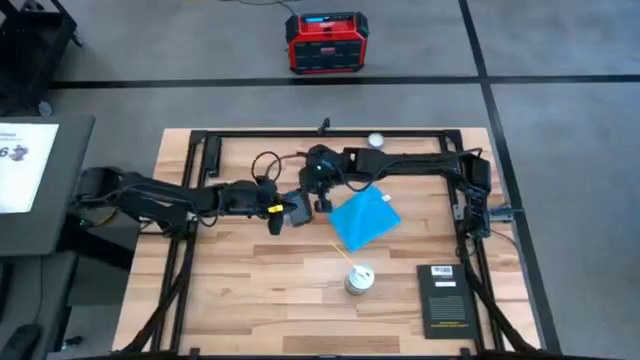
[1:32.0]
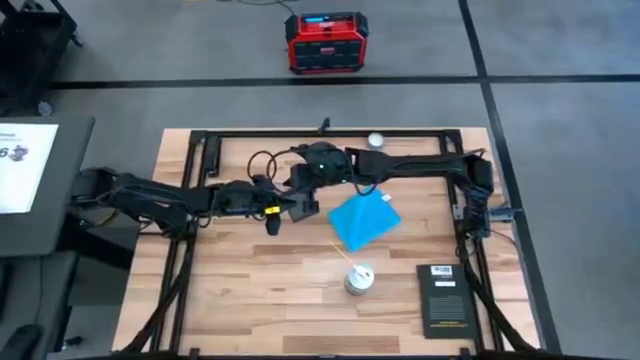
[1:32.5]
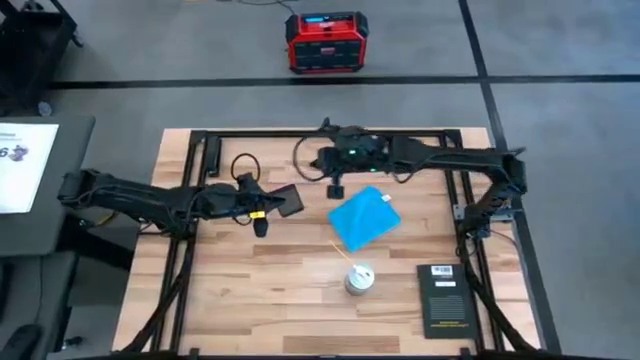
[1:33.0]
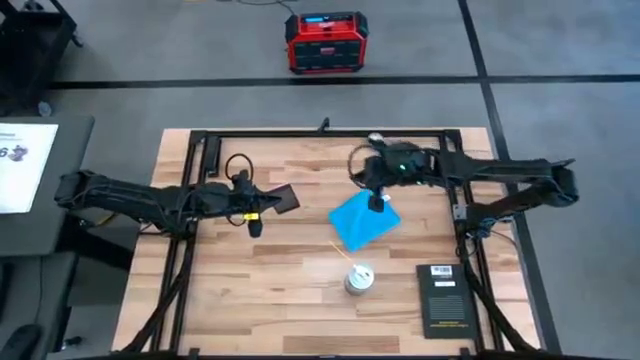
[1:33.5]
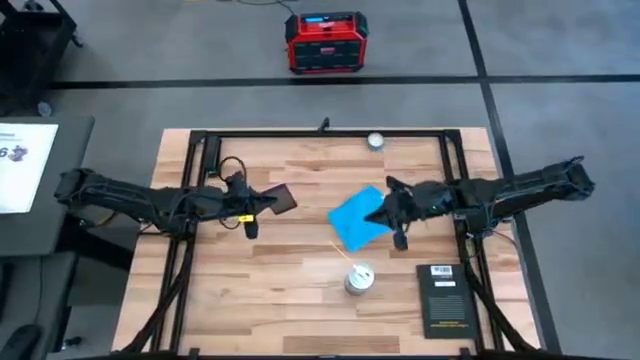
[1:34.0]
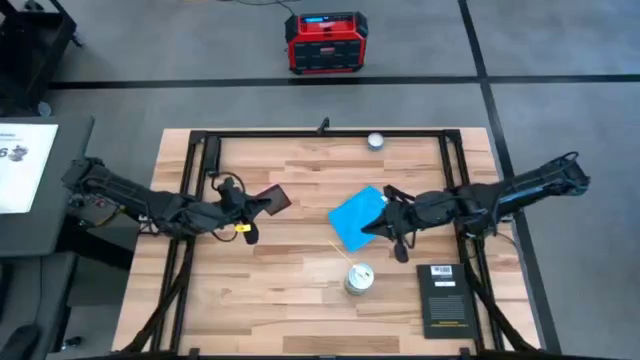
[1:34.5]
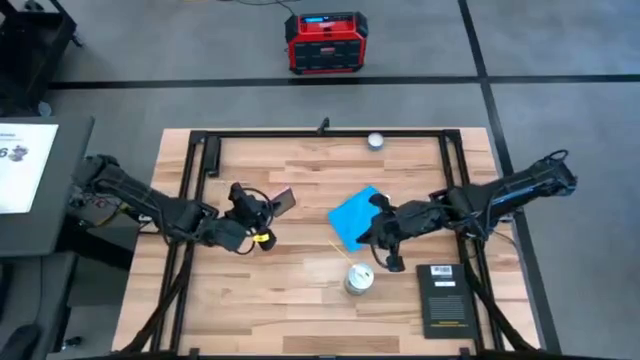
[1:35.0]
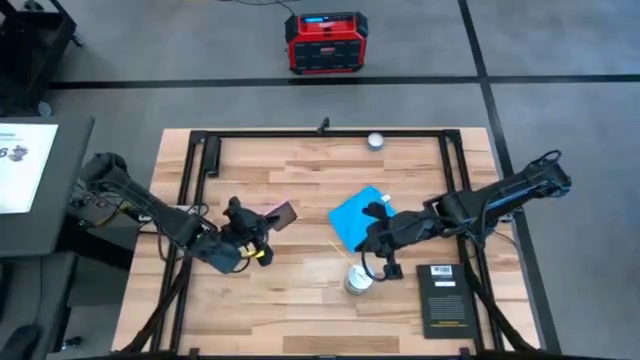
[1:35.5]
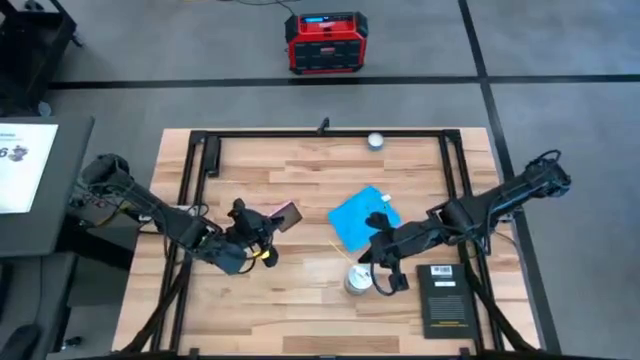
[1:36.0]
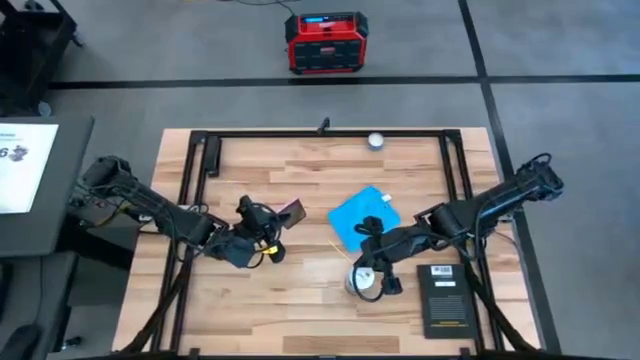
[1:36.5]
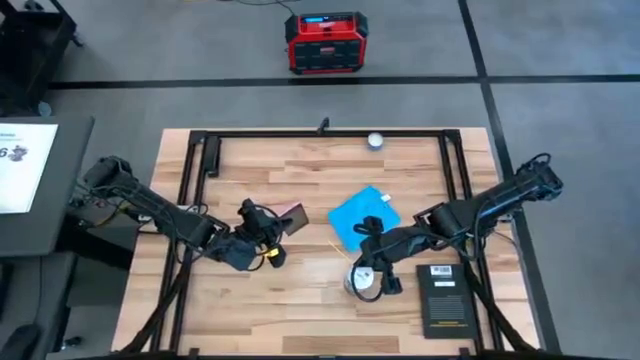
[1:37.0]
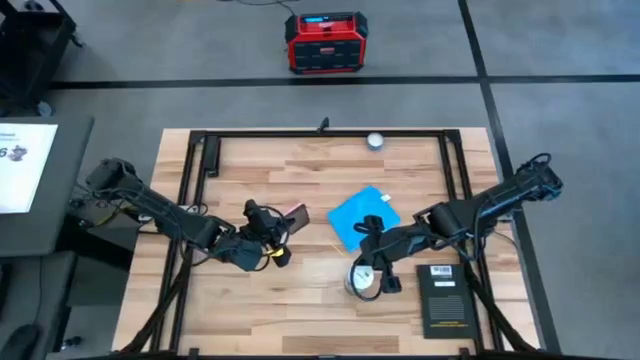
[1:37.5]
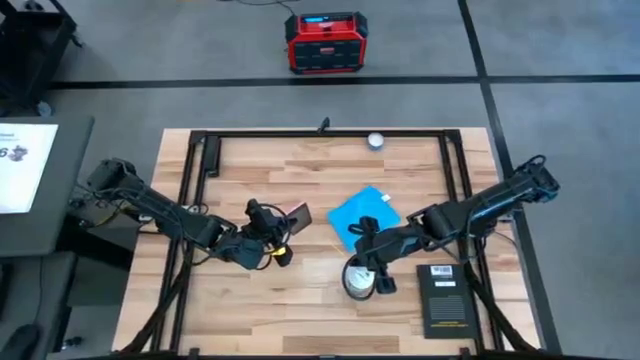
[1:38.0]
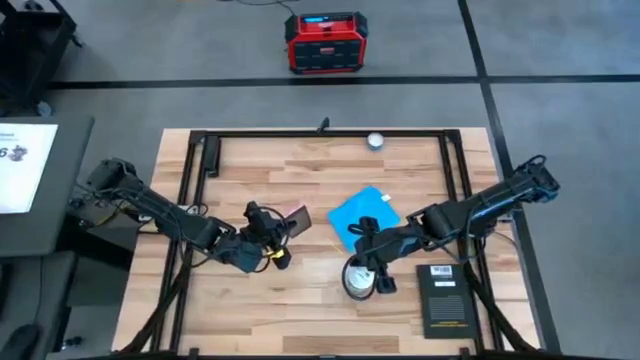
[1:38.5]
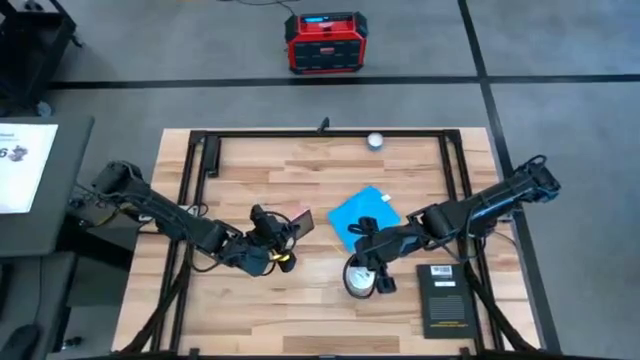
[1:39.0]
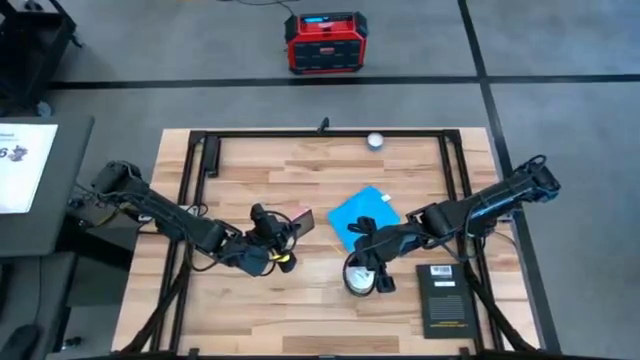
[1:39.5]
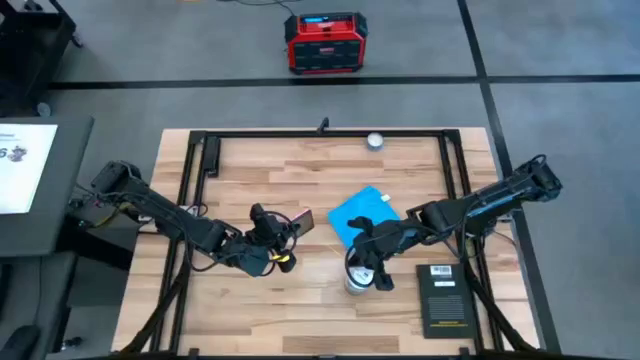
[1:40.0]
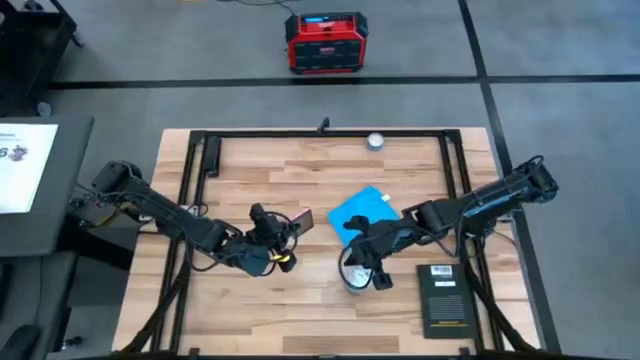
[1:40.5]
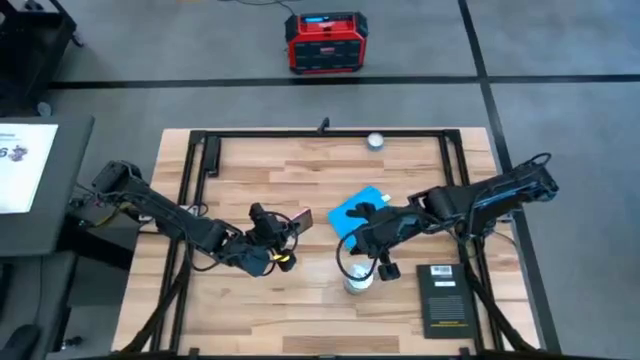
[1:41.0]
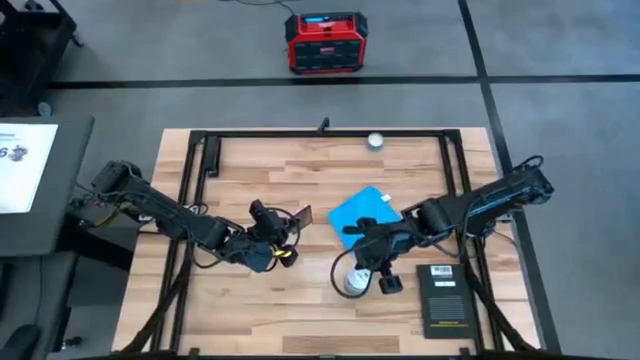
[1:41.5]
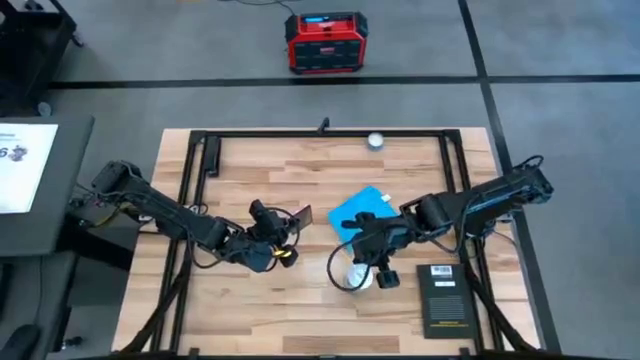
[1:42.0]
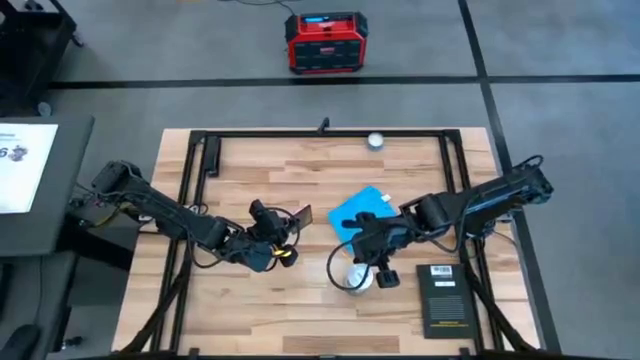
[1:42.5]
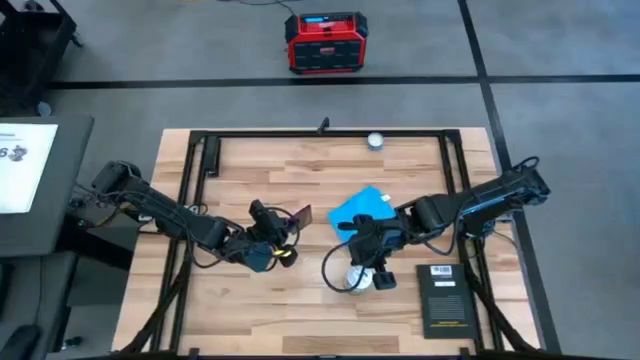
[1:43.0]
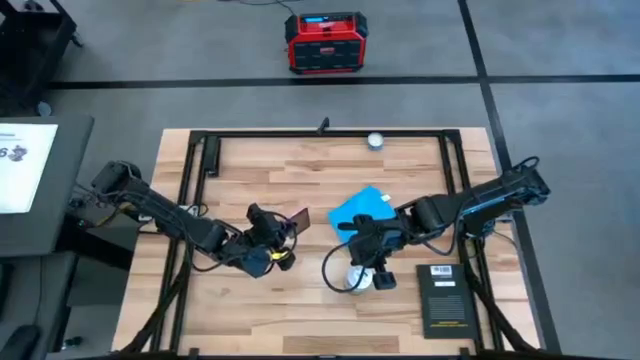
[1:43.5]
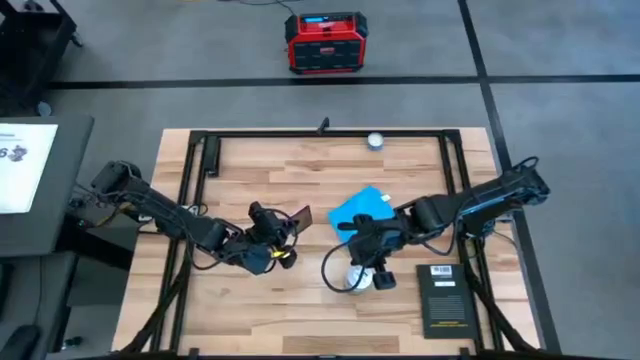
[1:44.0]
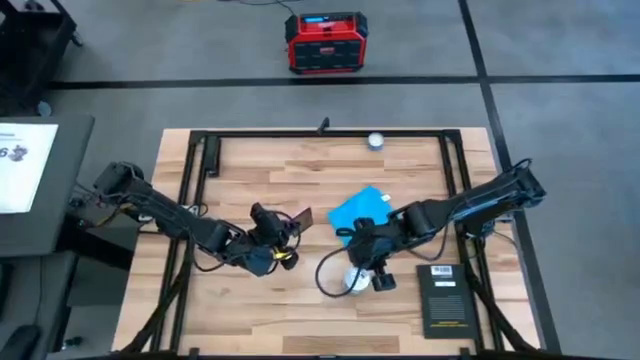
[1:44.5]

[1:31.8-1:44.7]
Task: Apply microfiber cloth
Spray the device using the spray bottle

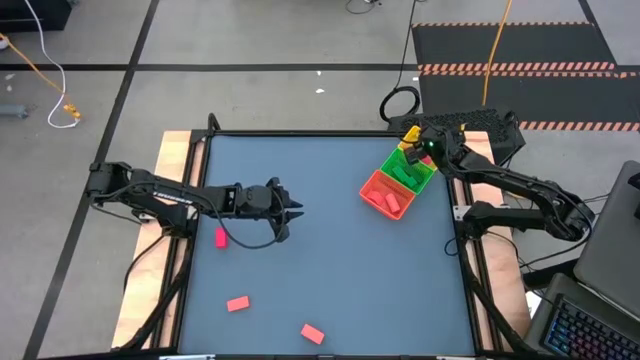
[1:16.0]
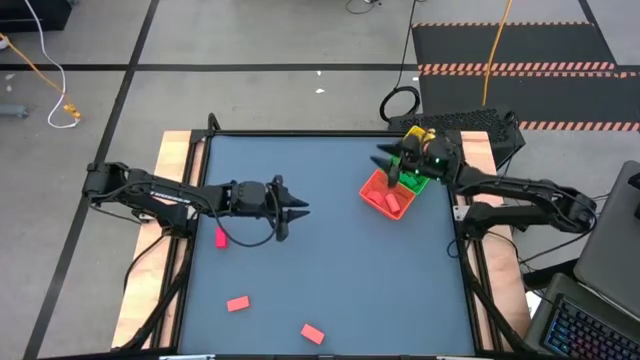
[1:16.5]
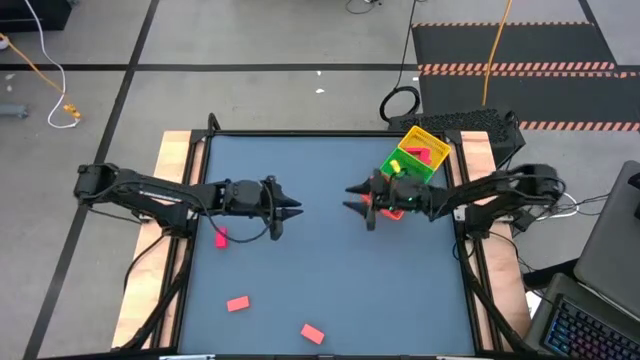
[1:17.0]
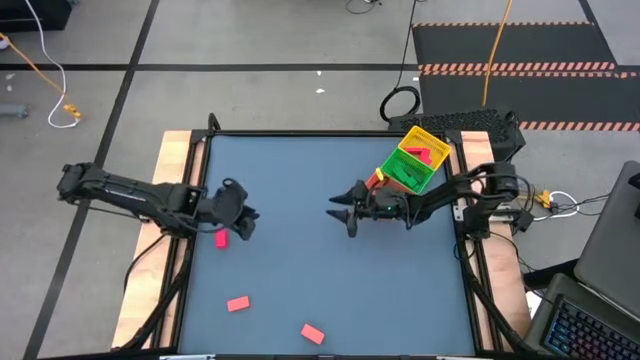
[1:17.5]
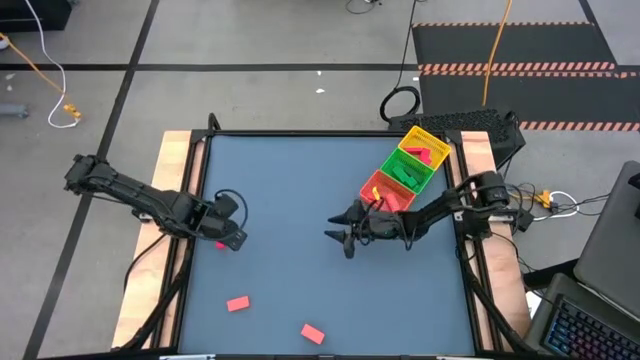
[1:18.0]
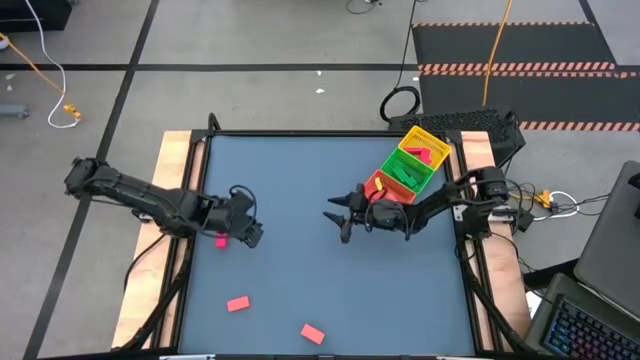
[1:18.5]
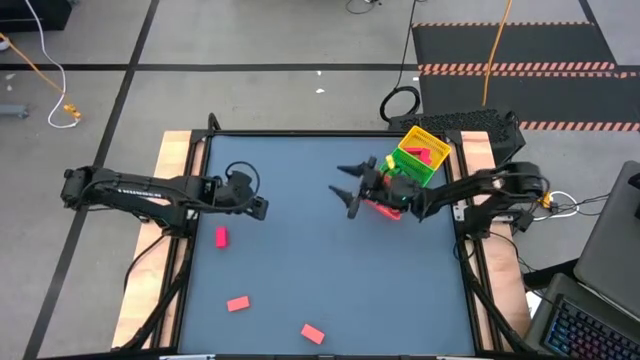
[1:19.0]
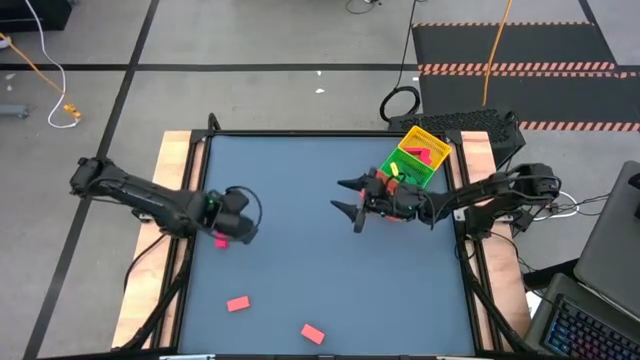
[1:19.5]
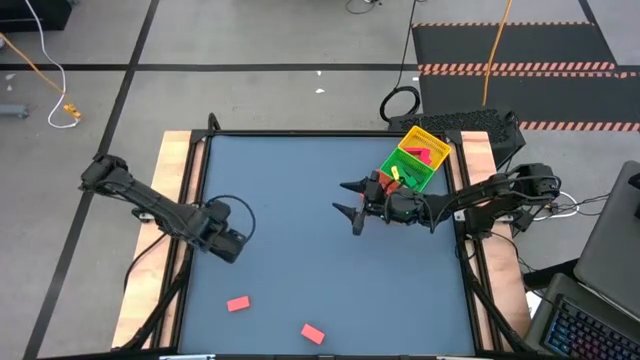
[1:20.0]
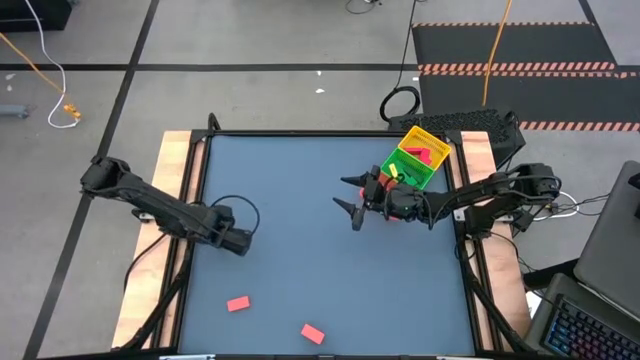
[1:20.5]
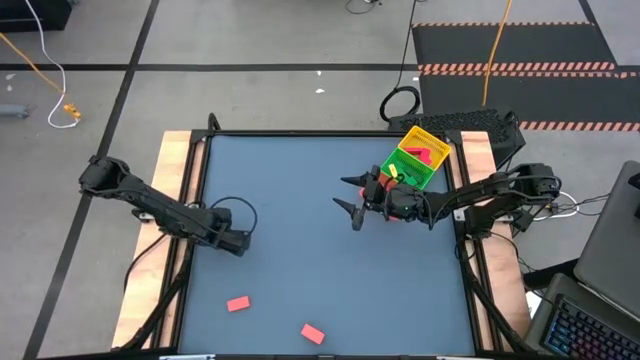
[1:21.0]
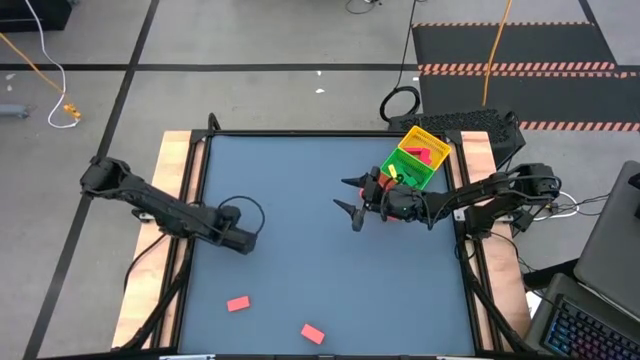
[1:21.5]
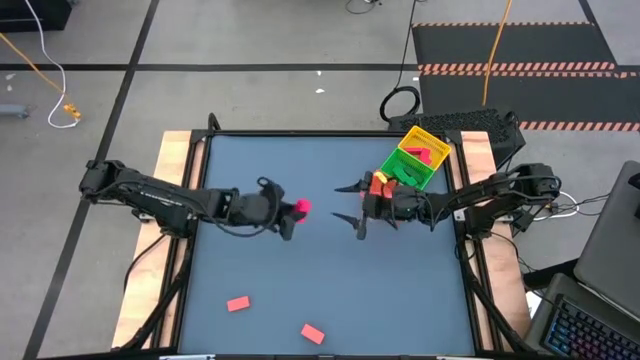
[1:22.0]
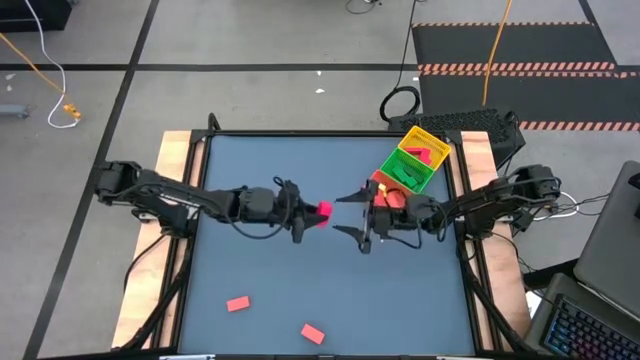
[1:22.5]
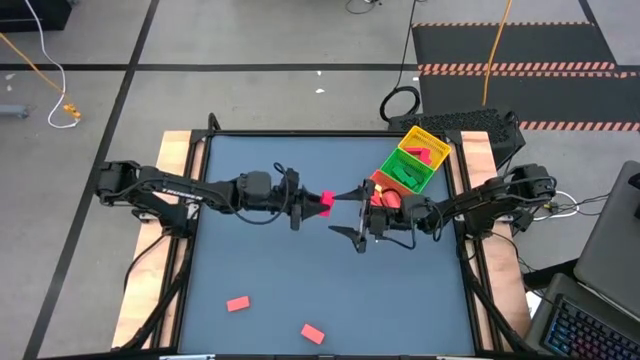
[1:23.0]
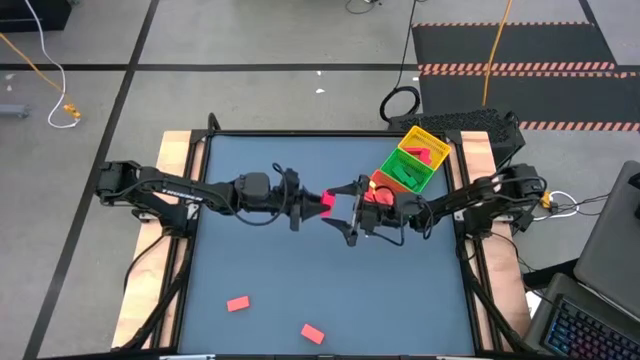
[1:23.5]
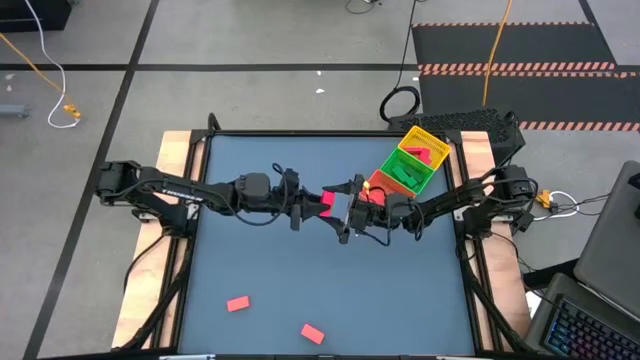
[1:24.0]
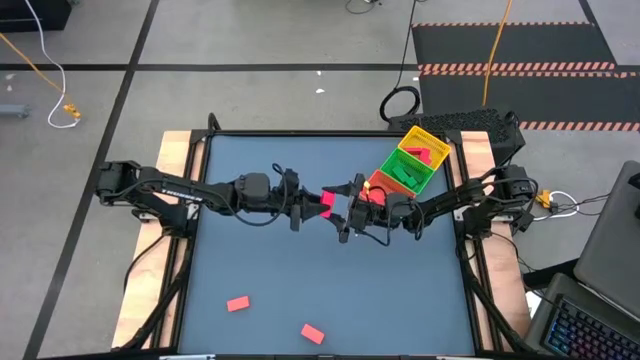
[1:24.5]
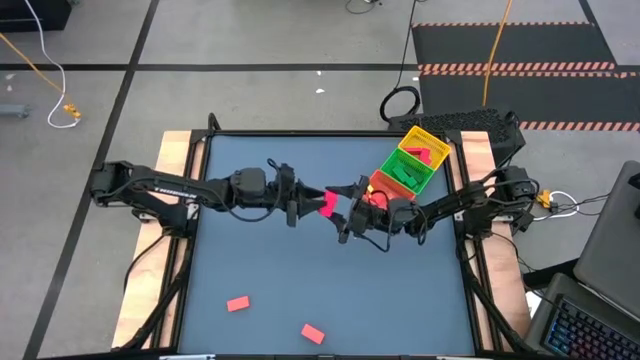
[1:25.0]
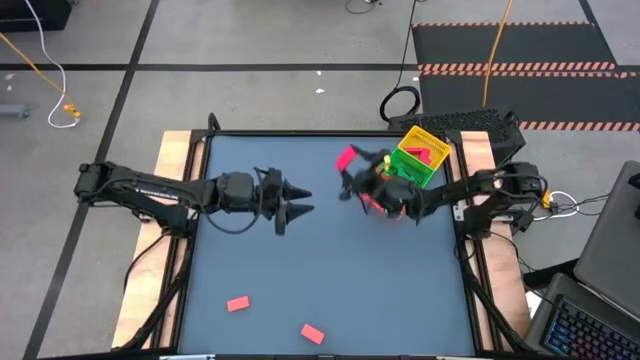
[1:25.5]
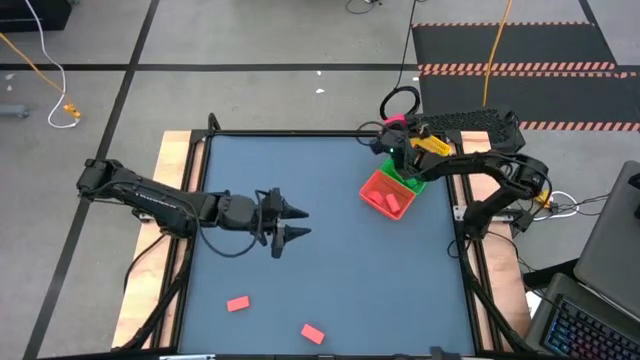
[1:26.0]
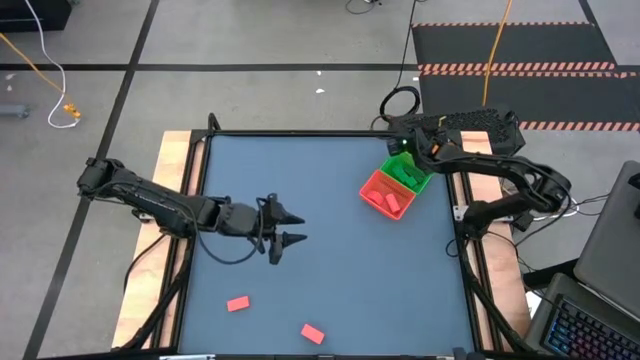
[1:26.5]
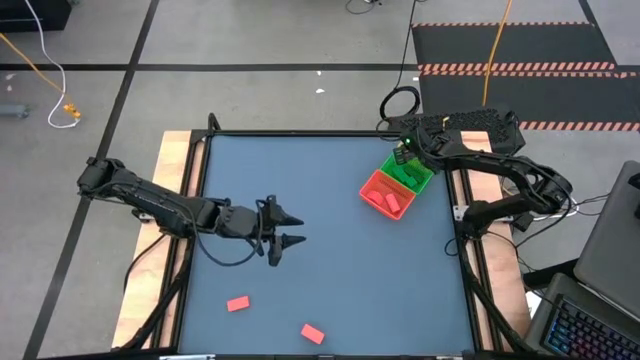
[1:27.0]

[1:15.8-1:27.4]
Task: Sort & place blocks by color
Put the red block into the yellow bin
